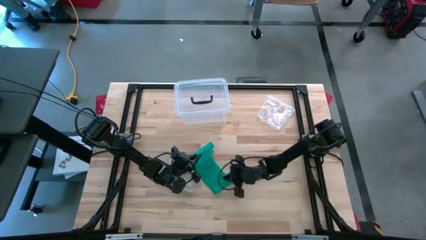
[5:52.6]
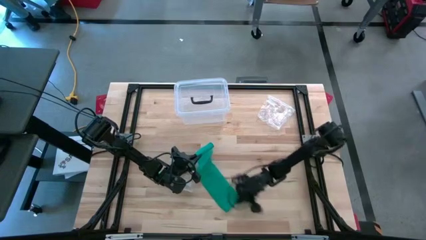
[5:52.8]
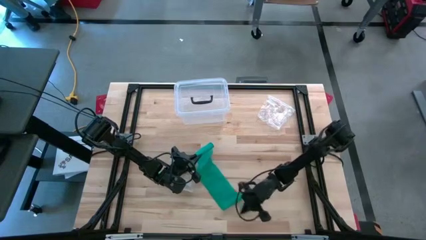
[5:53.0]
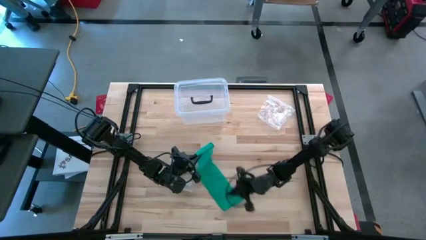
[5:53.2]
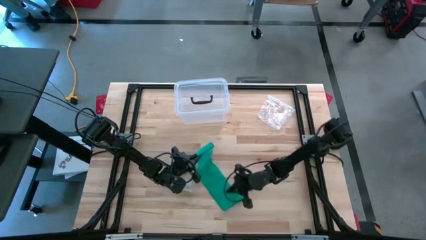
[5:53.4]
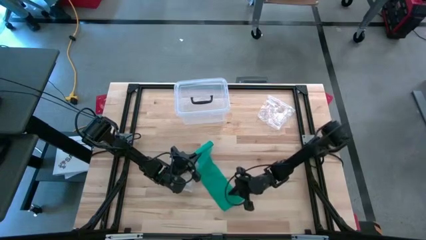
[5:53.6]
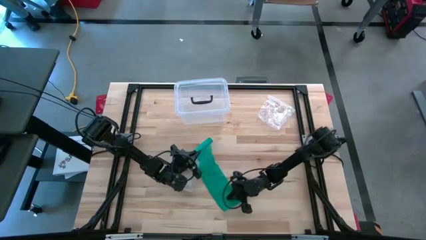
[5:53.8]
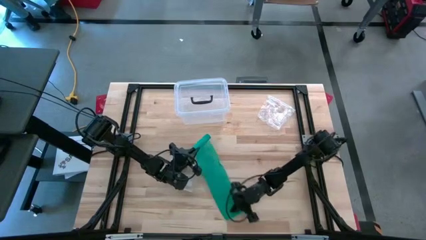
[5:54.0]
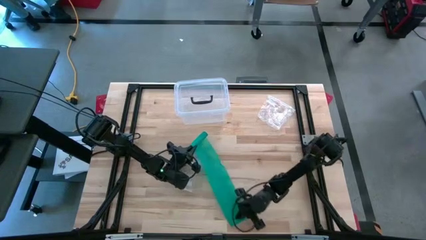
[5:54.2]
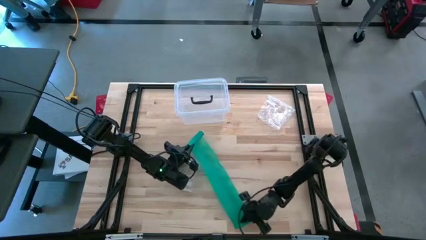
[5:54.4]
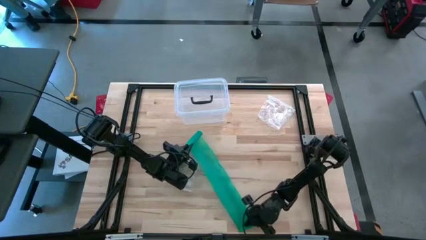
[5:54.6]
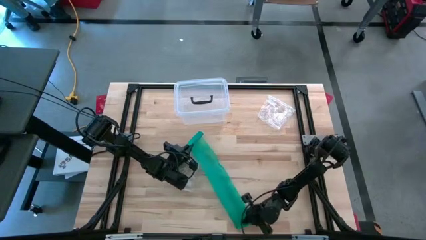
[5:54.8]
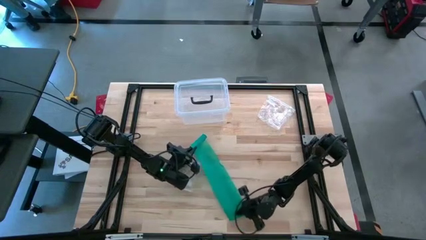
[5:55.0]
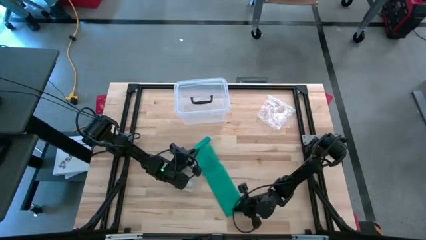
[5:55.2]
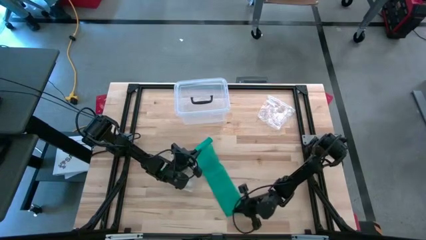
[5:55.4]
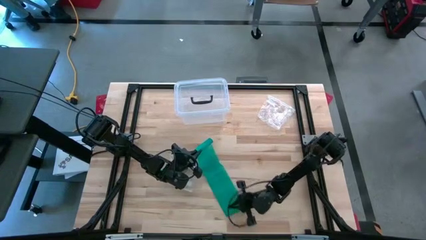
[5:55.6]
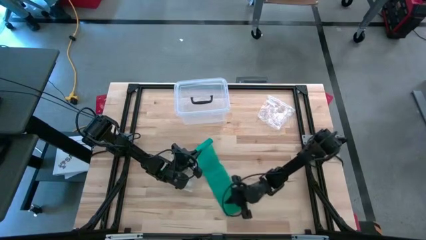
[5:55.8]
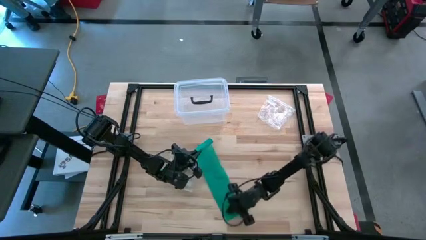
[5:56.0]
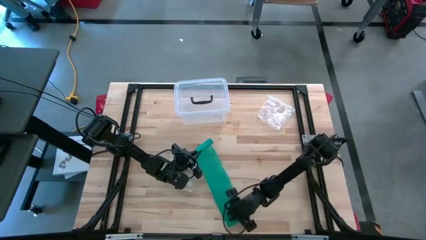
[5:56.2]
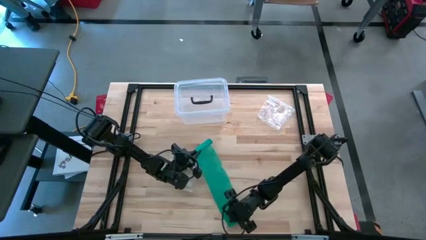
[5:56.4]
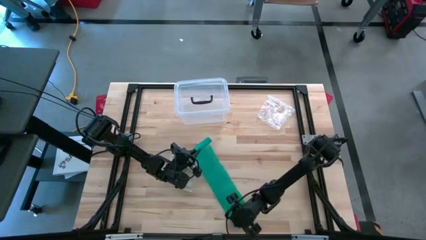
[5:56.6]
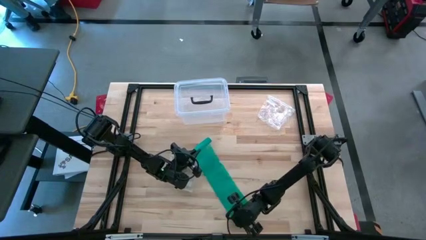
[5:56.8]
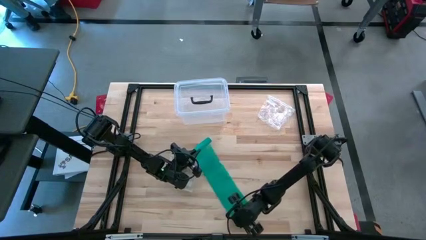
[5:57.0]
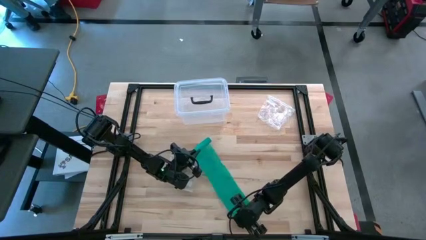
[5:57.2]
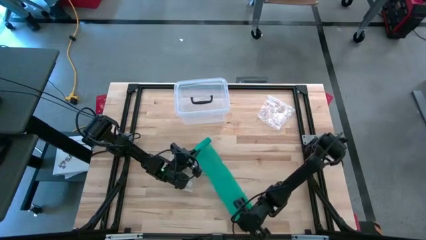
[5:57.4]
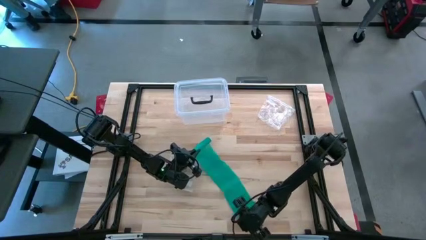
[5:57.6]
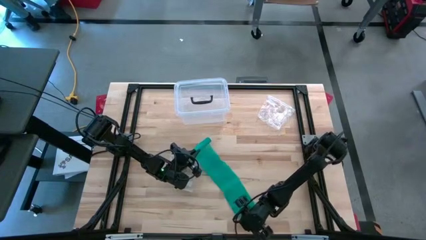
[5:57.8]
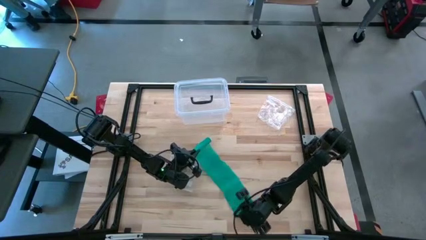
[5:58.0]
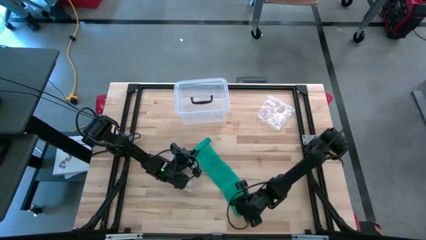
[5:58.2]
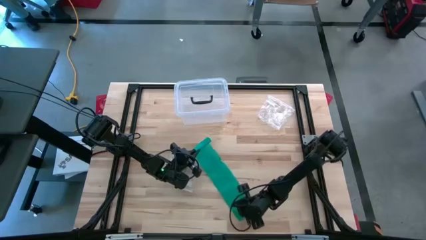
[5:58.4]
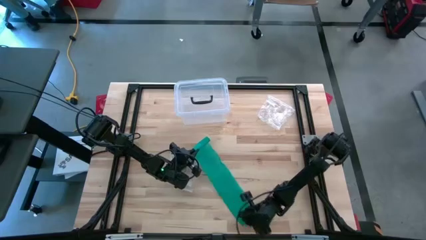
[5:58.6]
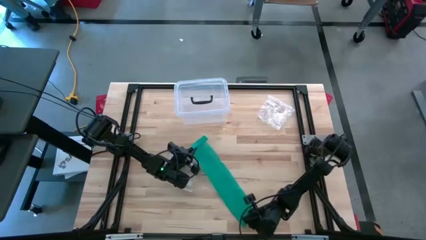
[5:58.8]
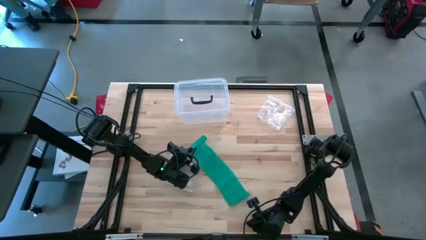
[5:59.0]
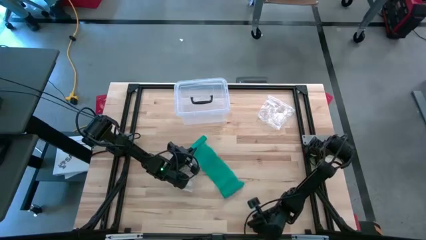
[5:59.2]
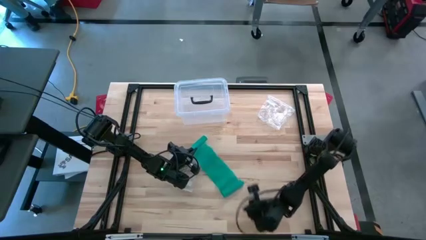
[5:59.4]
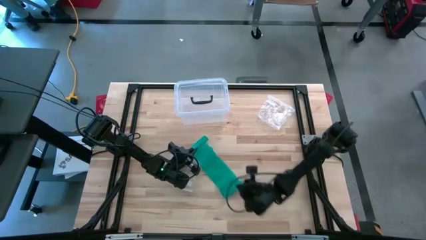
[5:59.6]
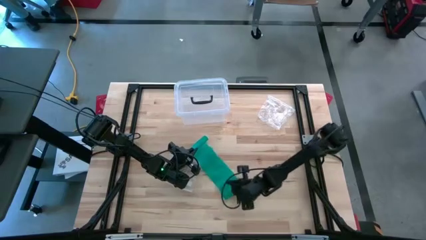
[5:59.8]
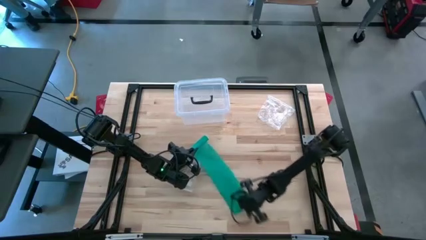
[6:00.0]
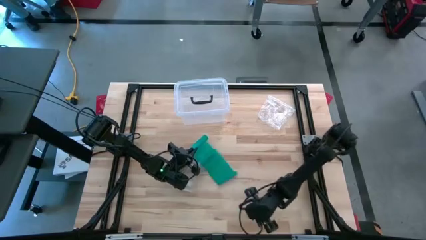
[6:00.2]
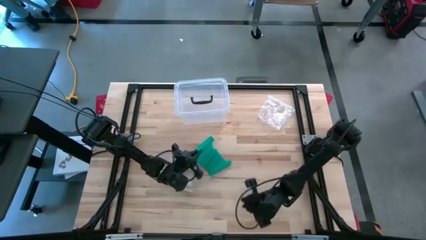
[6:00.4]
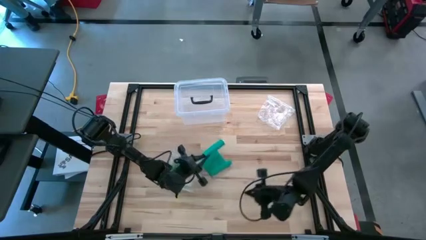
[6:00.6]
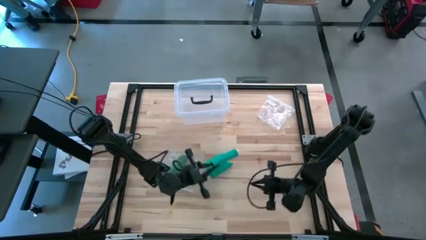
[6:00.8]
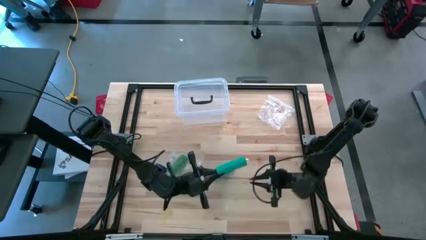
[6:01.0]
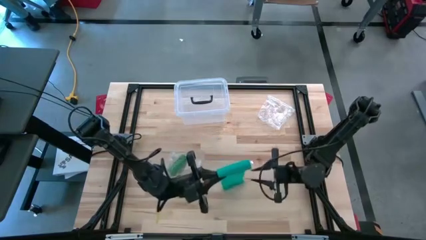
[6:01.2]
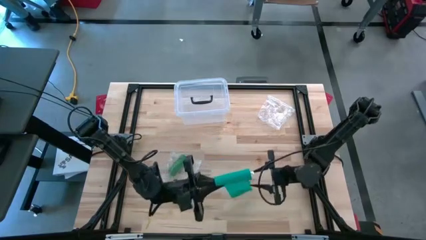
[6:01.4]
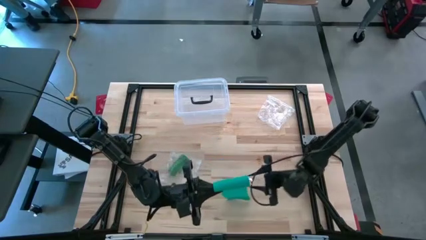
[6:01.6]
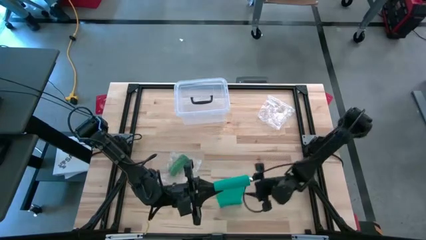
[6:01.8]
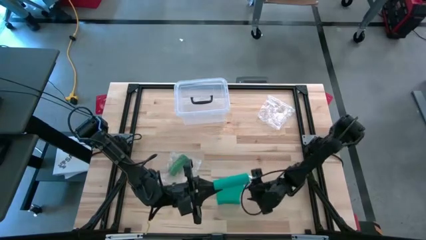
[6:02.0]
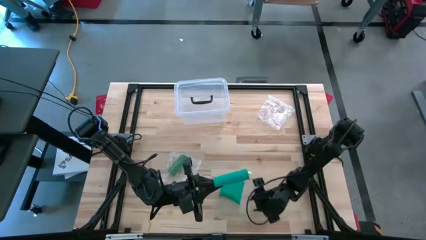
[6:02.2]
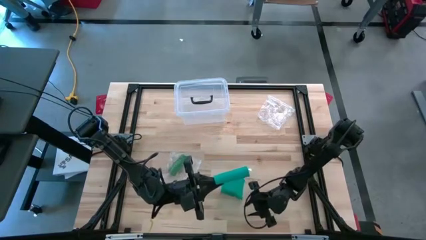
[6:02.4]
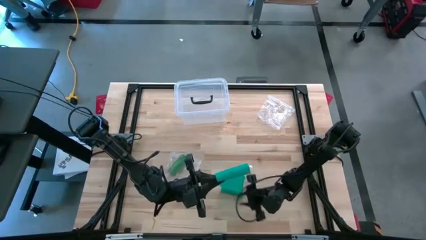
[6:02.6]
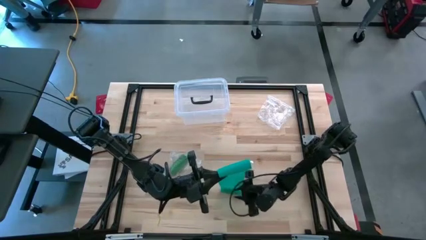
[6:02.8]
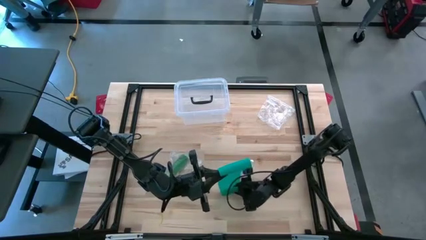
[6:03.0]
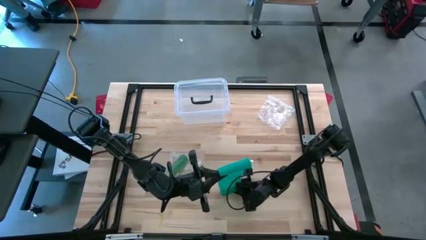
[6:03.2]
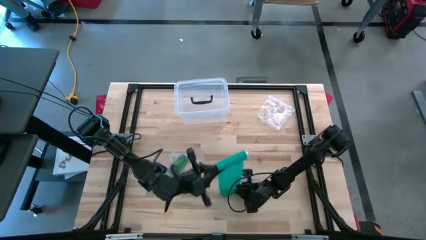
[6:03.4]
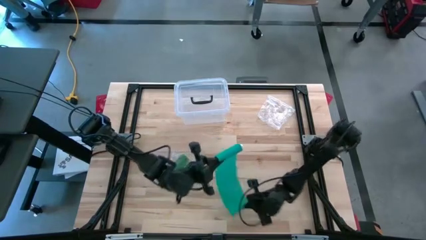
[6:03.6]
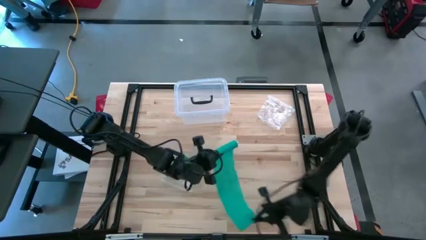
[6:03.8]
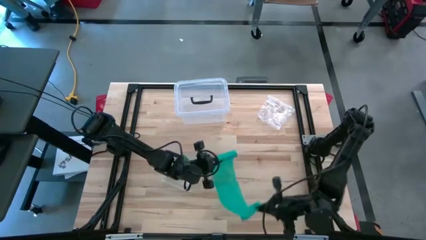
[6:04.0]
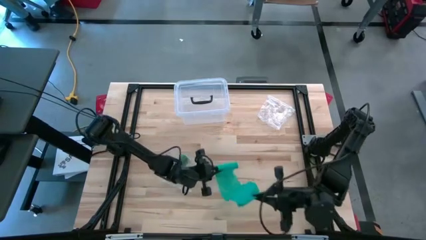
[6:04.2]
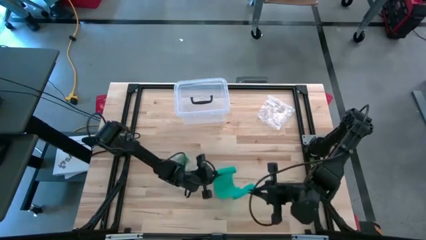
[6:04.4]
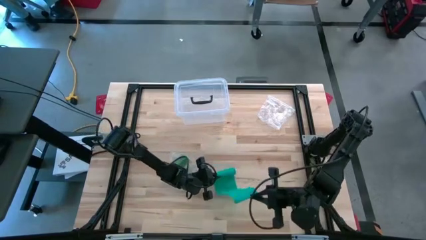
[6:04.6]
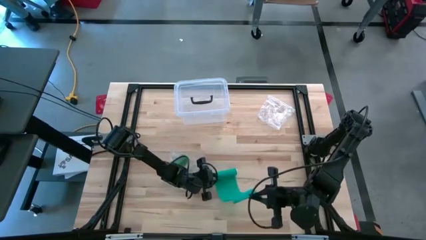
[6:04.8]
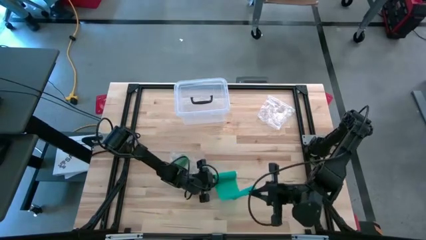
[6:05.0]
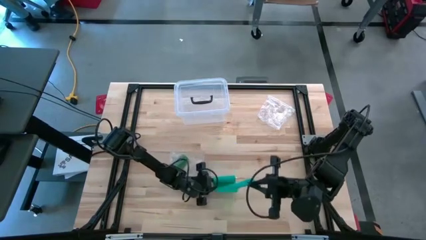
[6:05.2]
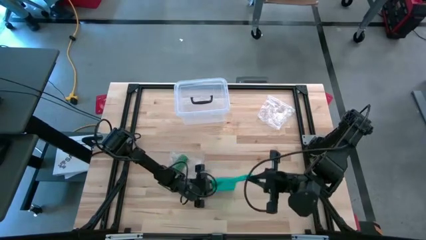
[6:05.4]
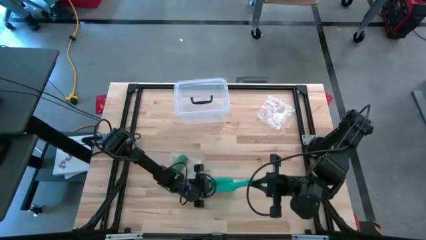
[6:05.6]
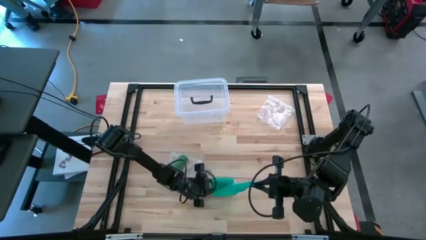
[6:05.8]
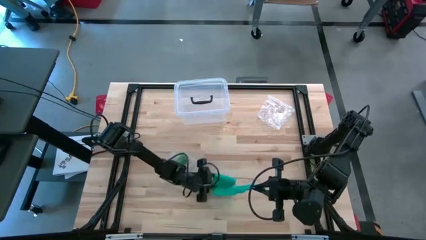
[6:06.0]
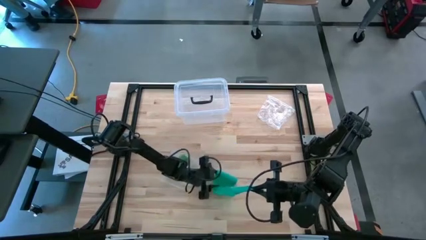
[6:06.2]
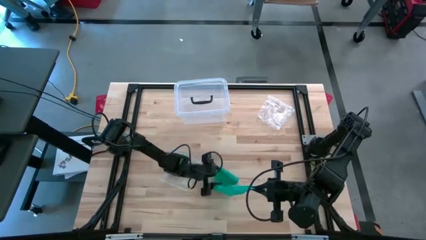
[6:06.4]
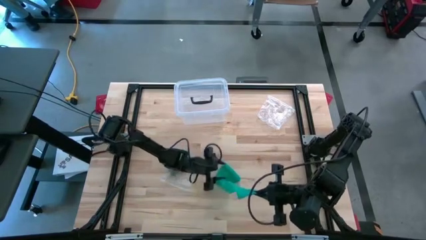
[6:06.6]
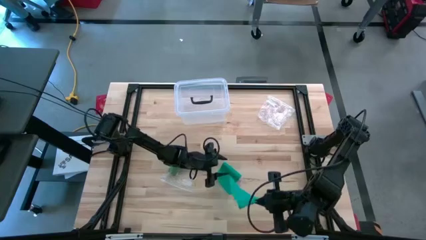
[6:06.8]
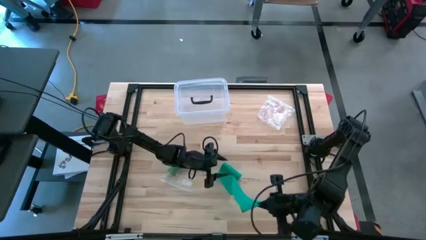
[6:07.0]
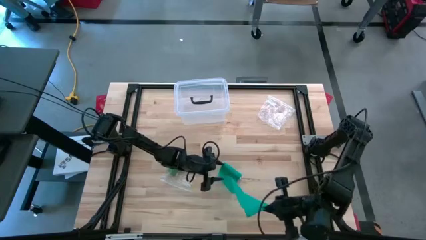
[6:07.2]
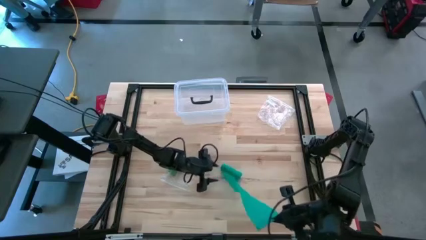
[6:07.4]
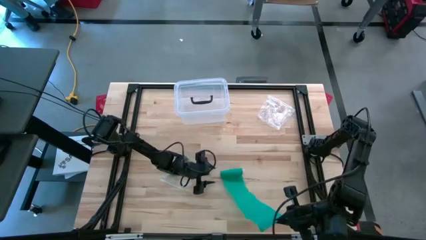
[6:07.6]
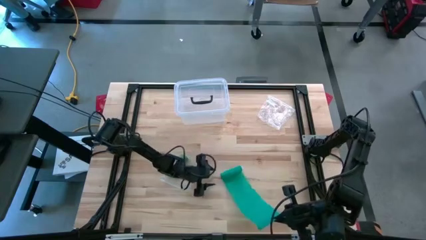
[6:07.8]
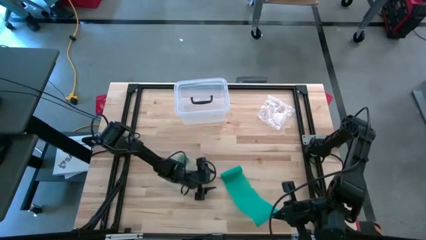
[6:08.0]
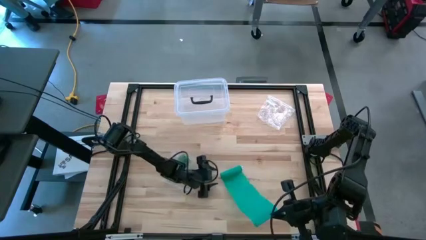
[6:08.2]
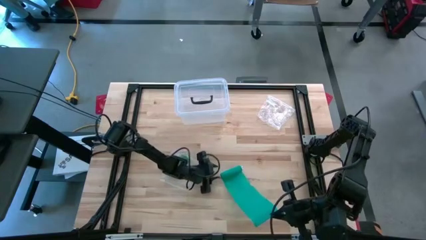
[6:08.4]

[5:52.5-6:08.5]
Task: Roll bandage
Roll the dark green bandage
